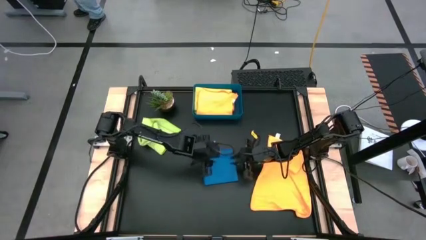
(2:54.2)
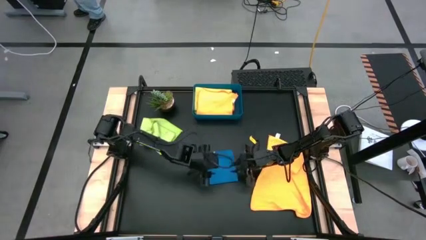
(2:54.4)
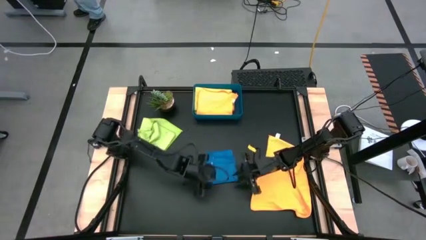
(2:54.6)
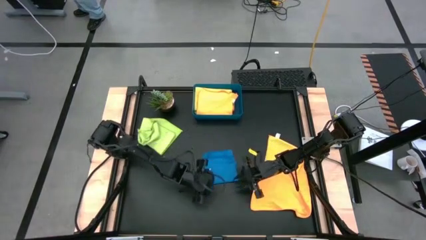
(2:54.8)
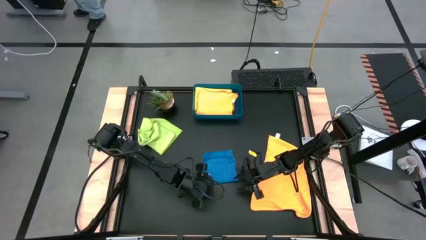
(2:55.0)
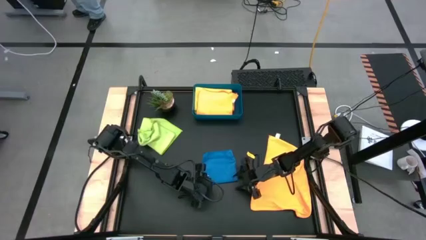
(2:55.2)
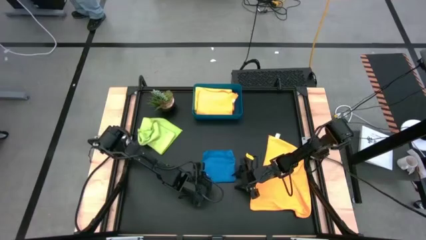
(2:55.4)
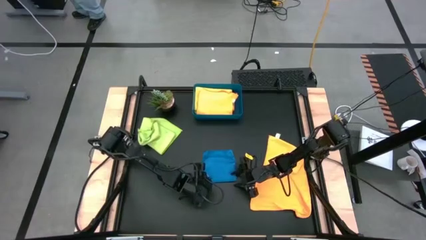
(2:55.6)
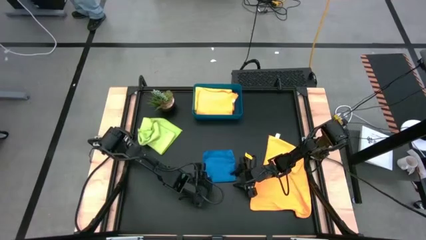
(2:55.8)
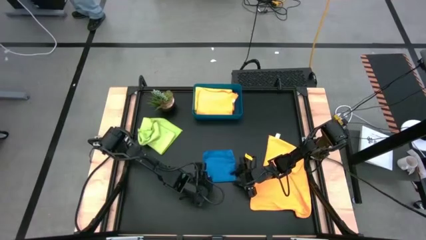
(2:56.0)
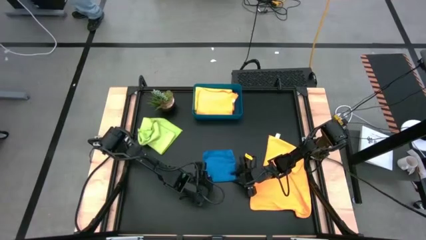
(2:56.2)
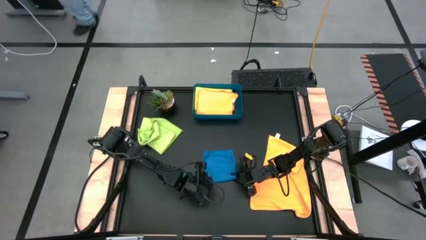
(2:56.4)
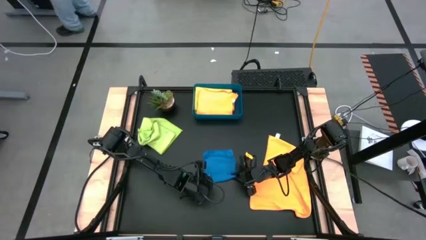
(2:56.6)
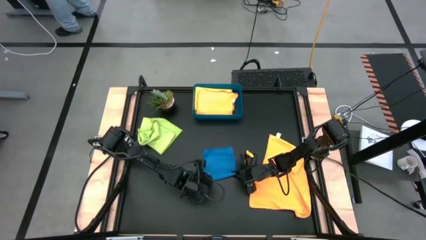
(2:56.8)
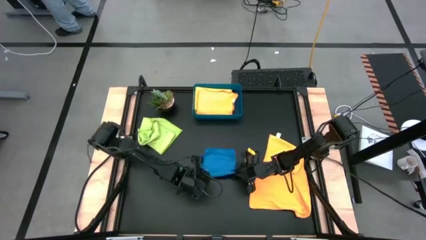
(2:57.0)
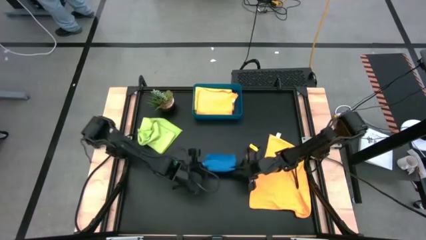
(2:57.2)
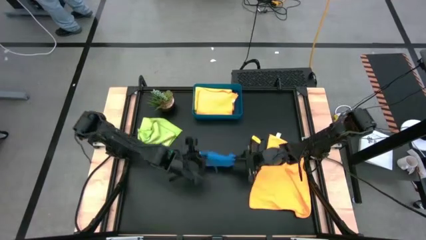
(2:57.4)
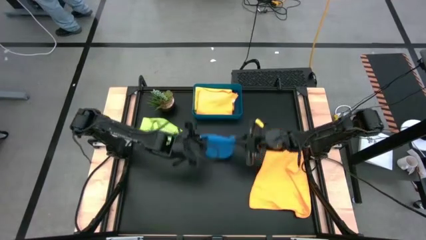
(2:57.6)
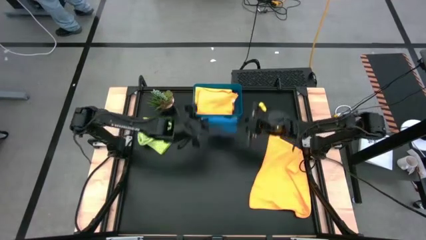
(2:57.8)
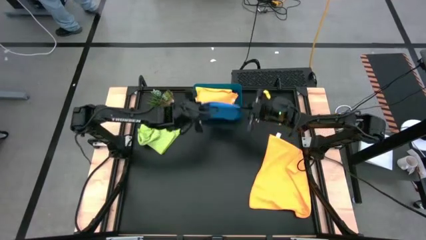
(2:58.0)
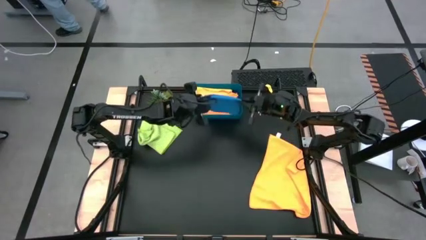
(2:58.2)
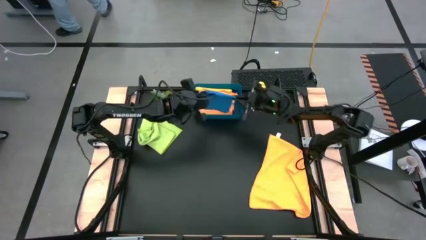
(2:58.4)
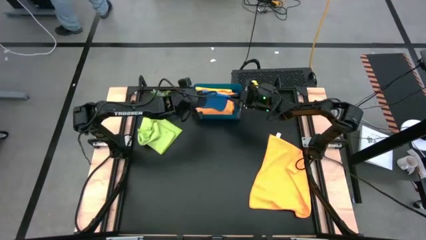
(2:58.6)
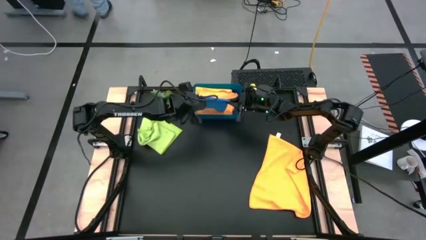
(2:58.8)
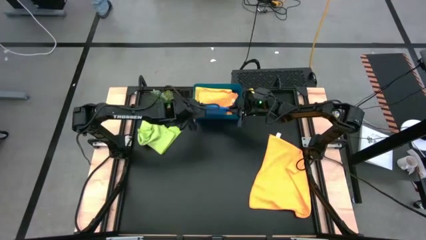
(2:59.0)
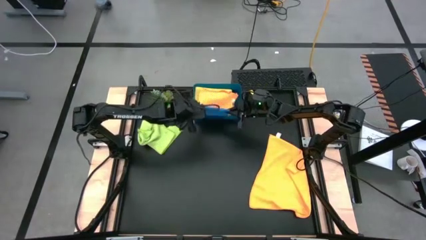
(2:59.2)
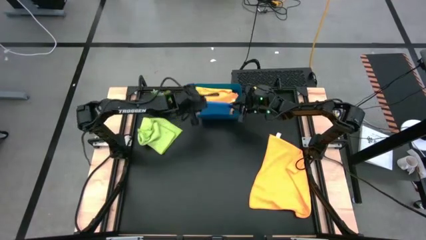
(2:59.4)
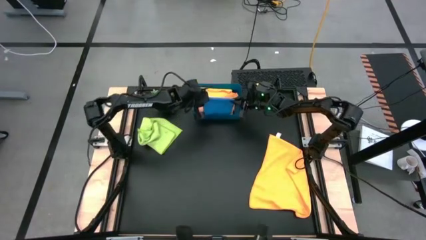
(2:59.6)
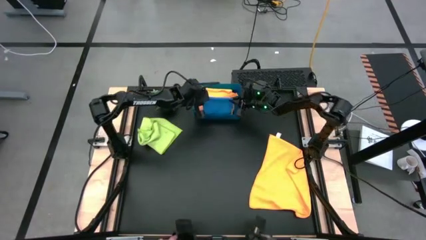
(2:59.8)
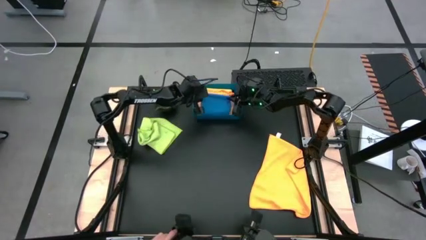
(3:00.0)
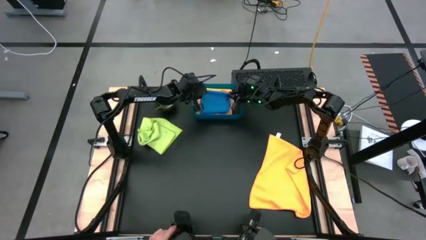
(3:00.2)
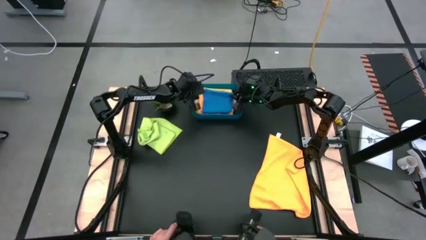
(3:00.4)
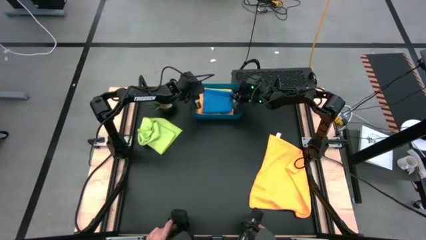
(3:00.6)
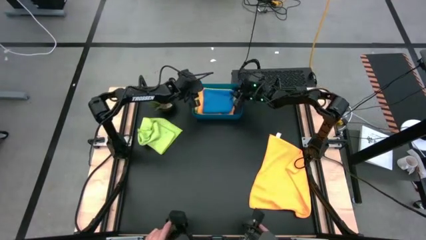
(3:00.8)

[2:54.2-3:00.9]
Task: Fold microfiber towels
Put the folded blue microfiber cloth into the blue bin

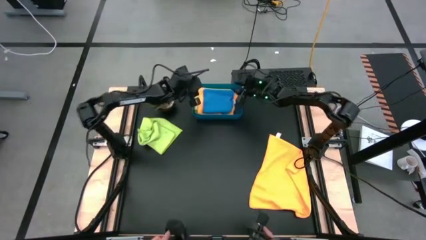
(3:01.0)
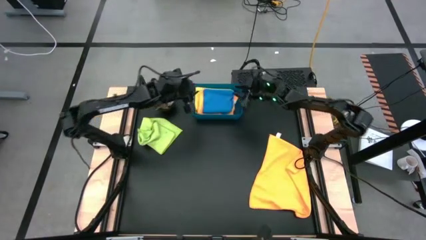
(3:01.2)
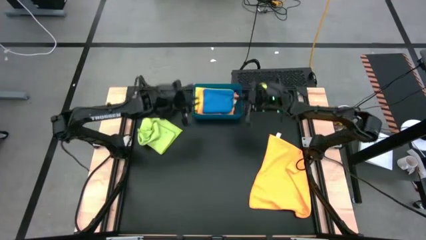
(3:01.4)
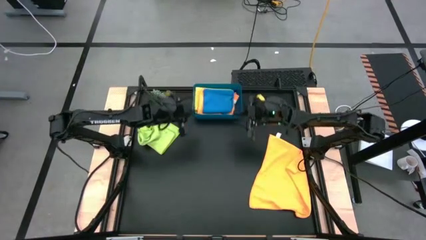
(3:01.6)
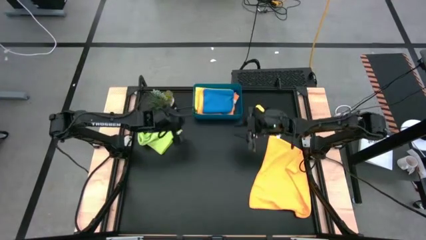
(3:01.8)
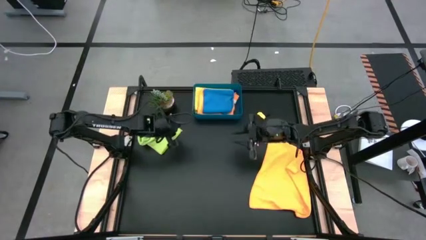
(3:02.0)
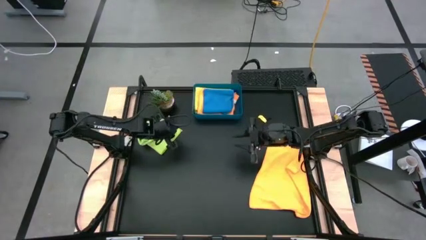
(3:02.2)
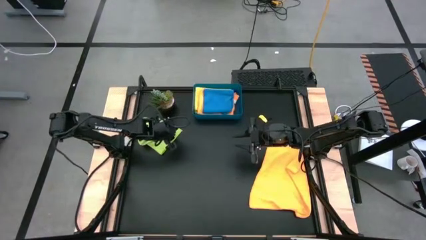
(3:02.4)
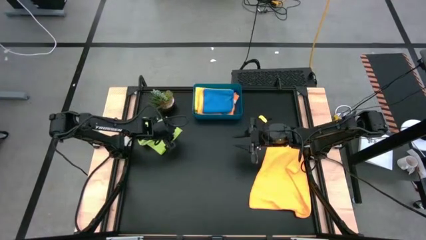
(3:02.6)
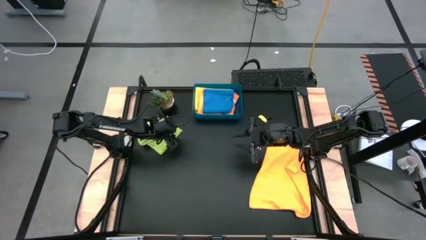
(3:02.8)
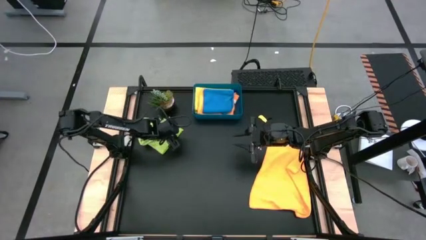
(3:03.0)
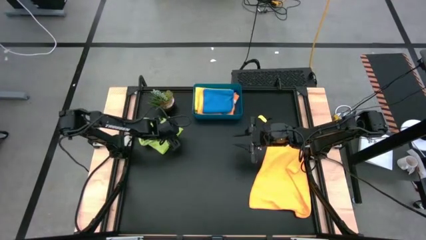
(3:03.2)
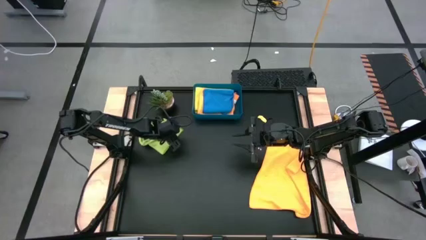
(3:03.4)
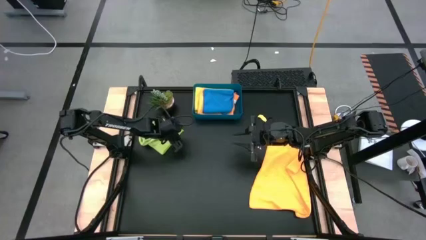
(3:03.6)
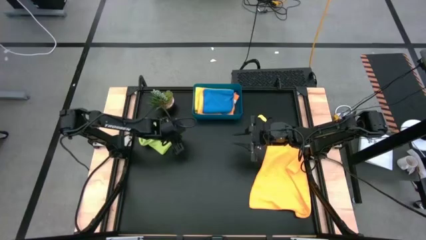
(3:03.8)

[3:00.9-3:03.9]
Fold the green microfiber cloth

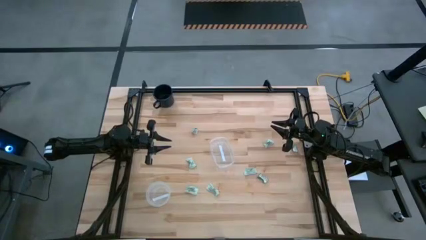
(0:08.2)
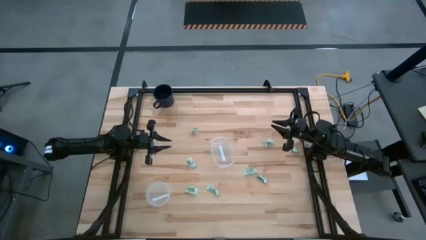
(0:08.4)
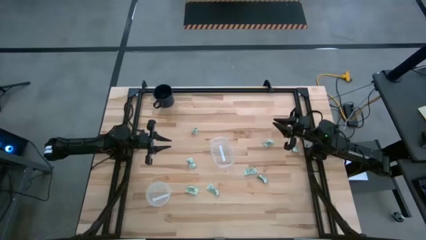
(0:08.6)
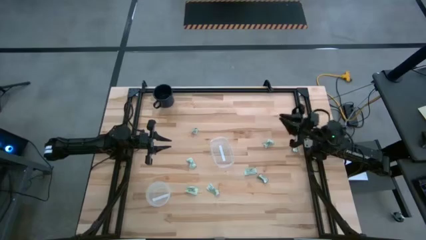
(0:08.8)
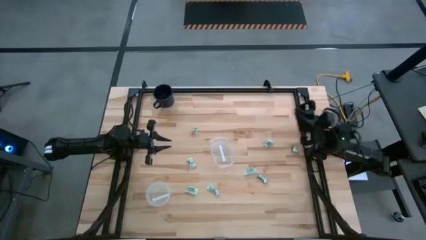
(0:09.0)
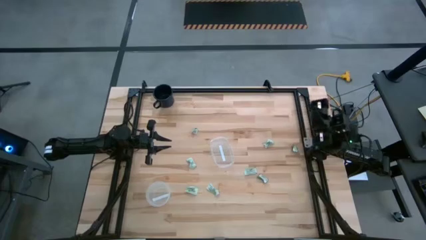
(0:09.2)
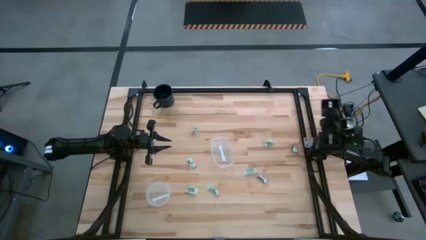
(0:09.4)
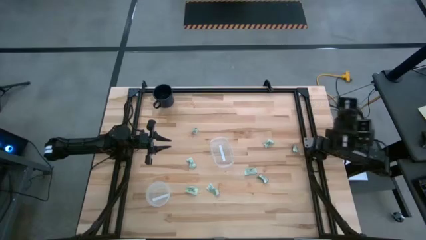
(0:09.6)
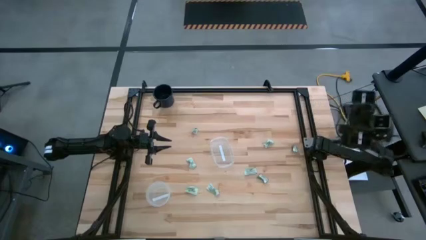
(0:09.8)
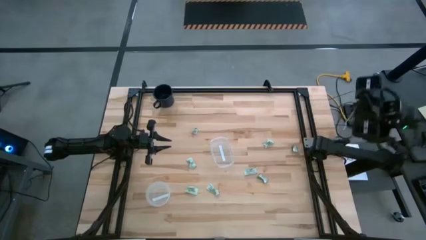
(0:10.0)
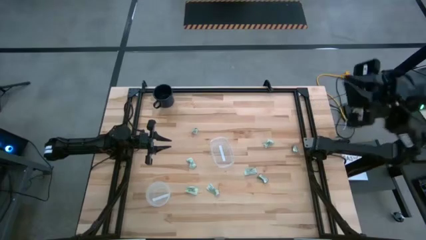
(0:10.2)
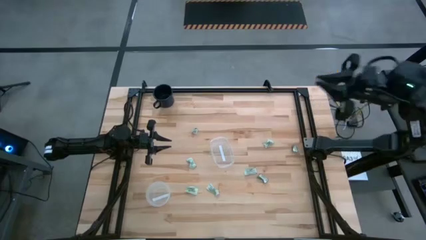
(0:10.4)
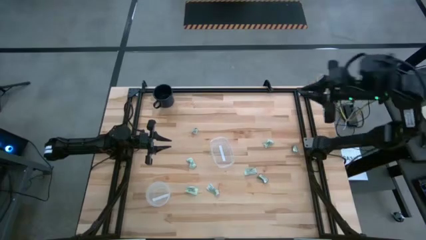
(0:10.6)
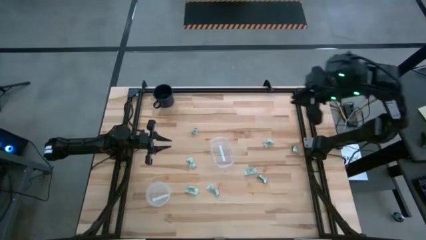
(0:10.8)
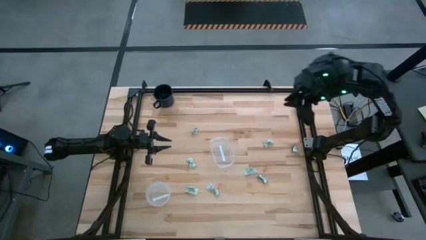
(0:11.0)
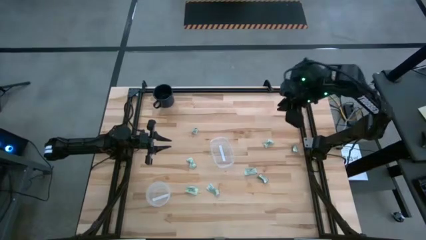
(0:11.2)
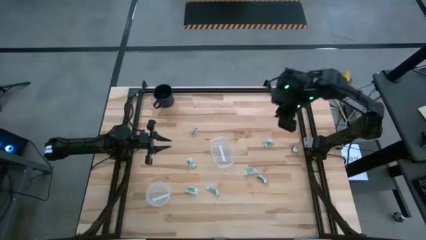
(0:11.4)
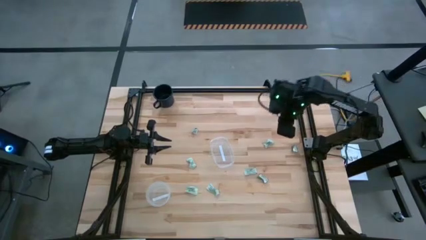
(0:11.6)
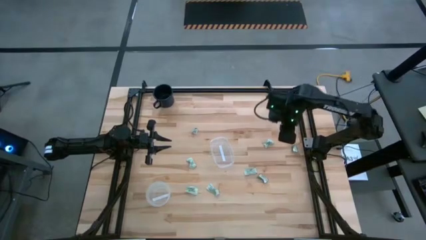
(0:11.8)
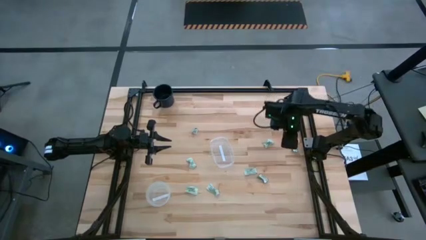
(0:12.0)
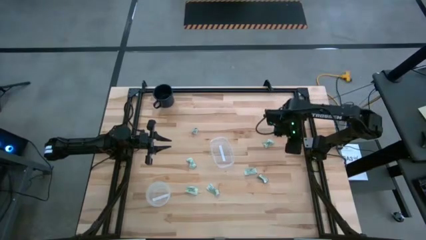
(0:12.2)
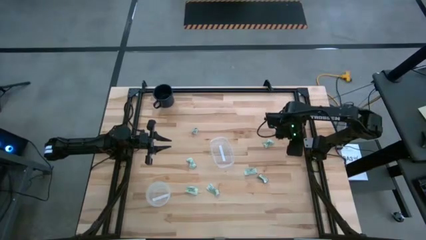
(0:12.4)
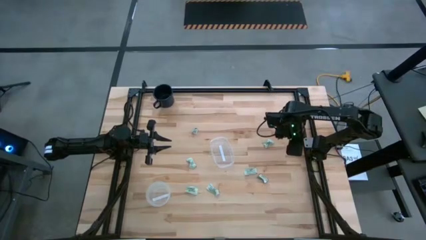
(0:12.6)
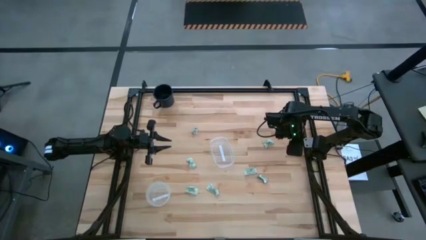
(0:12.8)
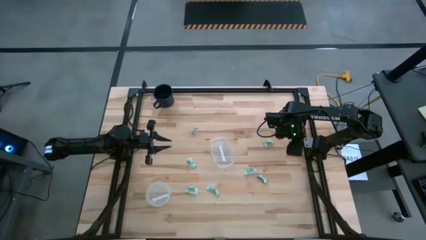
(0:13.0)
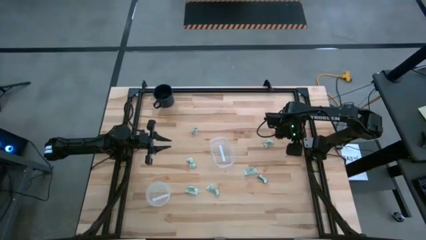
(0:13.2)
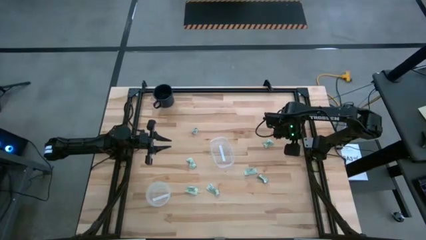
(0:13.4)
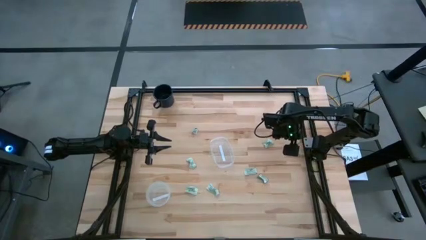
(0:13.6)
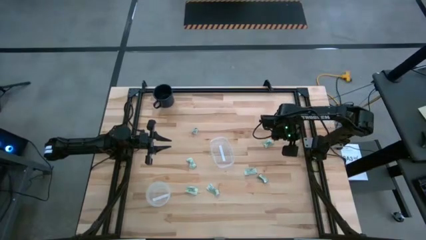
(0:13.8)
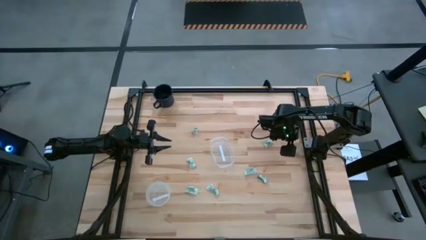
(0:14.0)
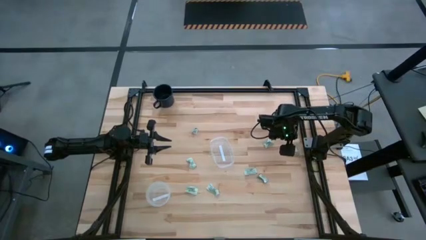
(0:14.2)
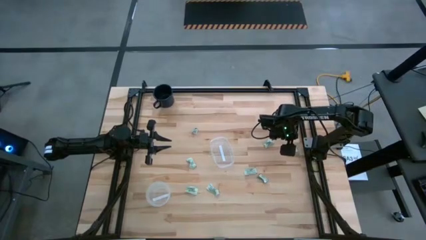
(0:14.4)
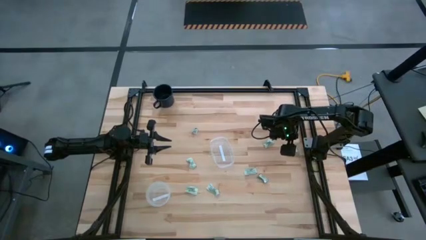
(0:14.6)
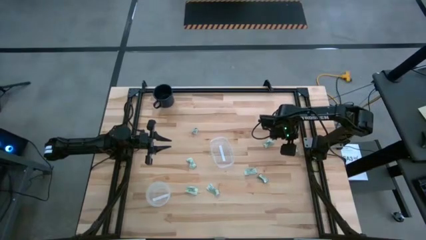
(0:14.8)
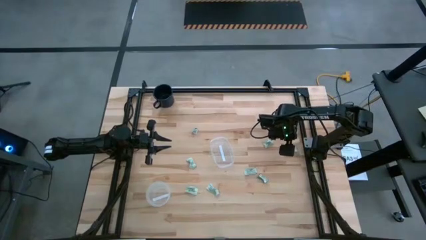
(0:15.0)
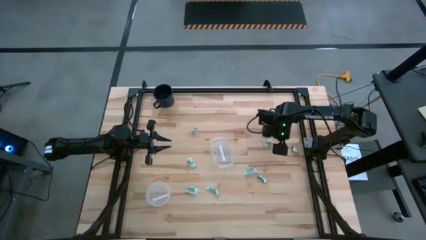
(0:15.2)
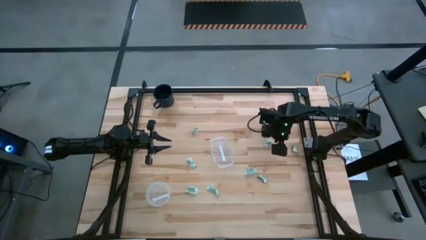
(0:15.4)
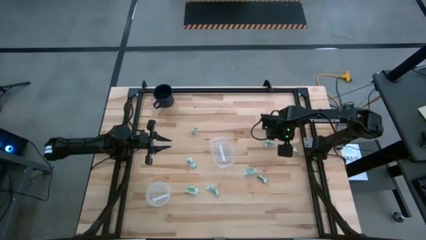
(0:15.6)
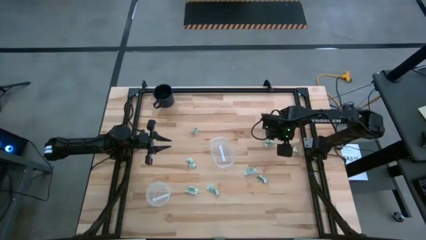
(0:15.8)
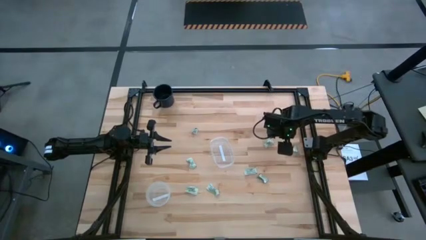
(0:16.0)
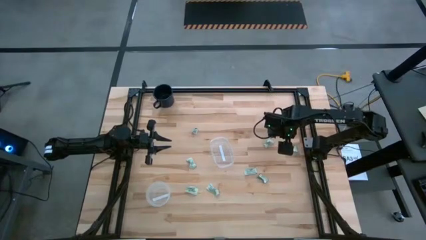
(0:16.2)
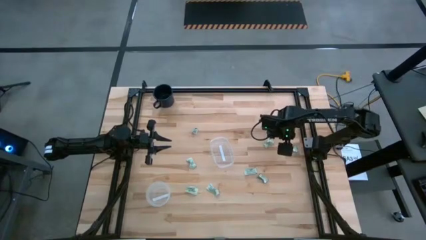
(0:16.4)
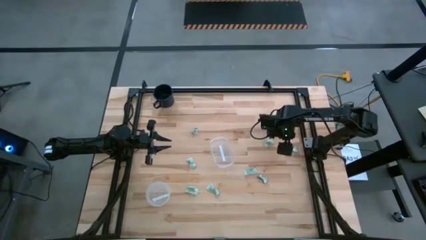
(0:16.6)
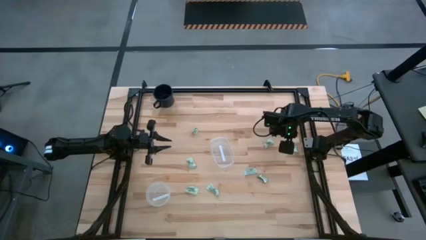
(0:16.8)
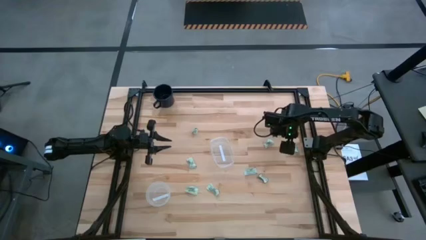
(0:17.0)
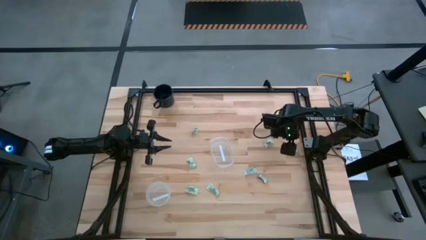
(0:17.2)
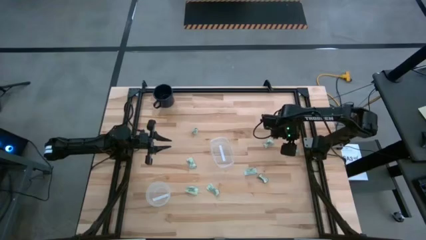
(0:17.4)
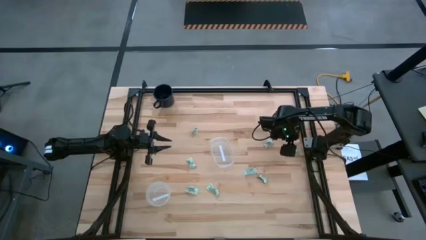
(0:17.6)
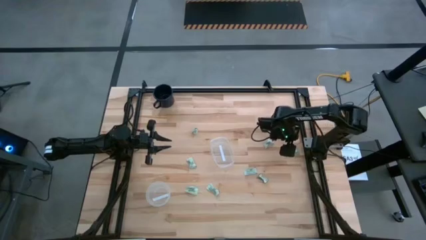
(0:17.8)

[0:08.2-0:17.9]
Task: Pick and place items into bin
Put the stevia packet into the transparent bin
